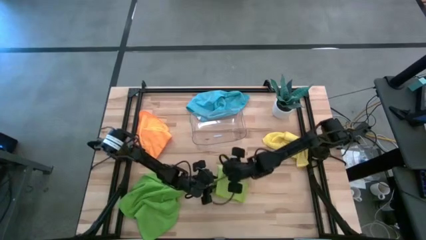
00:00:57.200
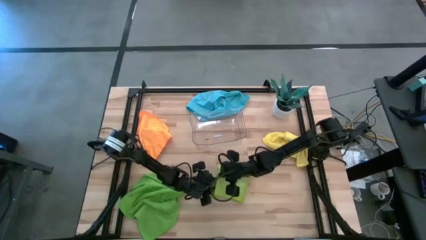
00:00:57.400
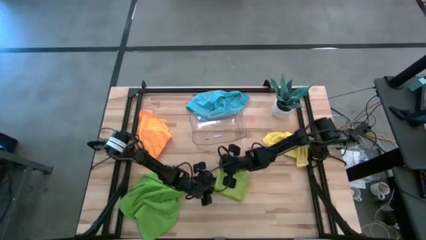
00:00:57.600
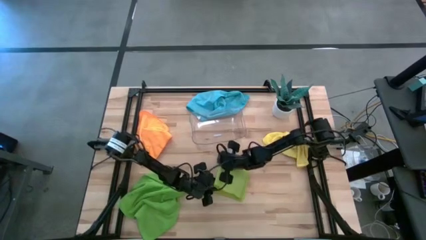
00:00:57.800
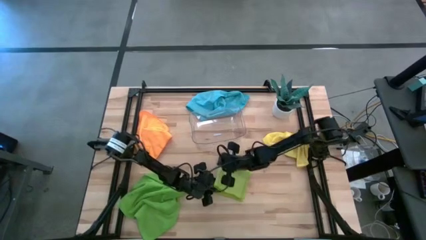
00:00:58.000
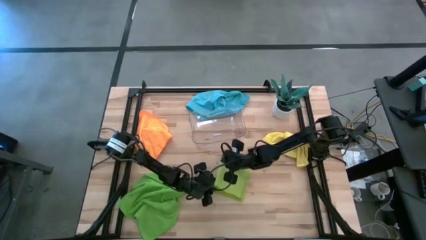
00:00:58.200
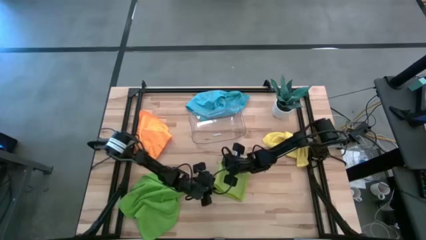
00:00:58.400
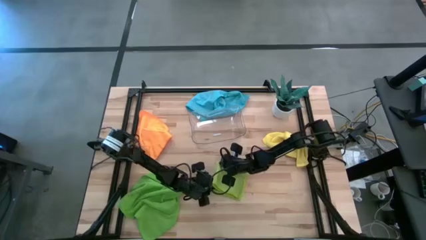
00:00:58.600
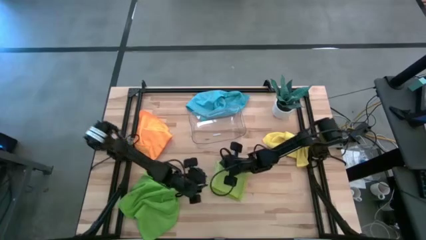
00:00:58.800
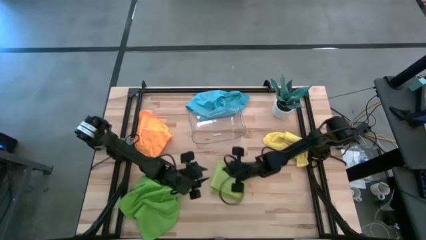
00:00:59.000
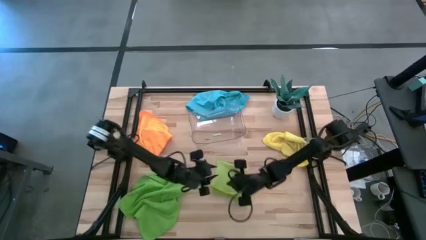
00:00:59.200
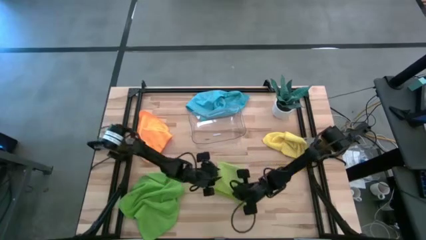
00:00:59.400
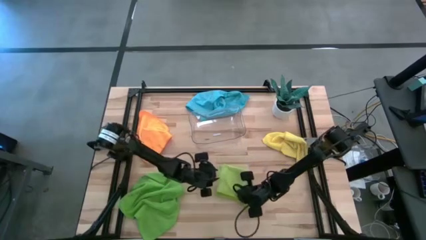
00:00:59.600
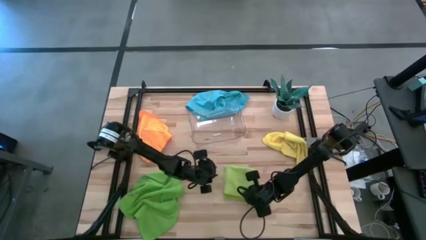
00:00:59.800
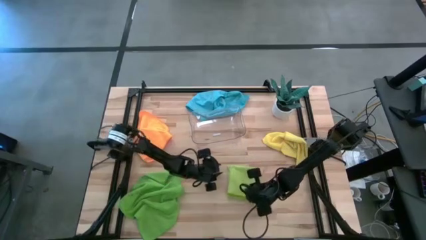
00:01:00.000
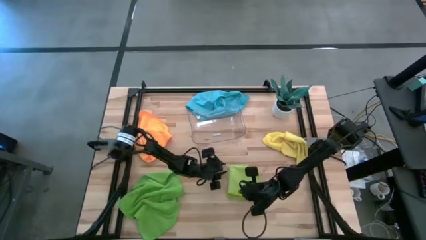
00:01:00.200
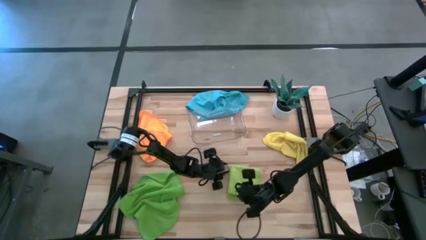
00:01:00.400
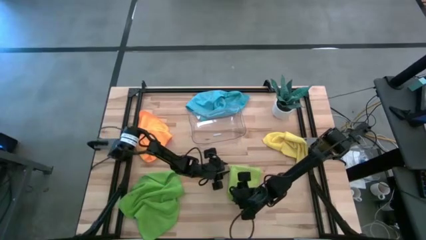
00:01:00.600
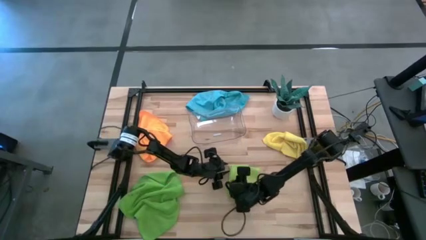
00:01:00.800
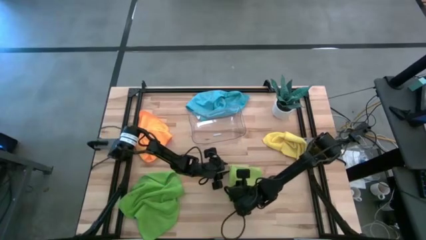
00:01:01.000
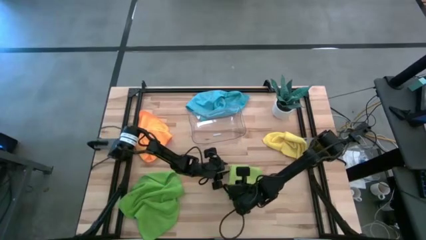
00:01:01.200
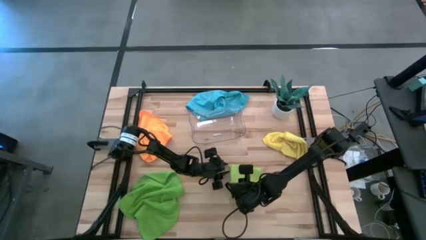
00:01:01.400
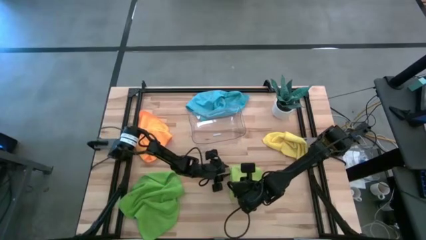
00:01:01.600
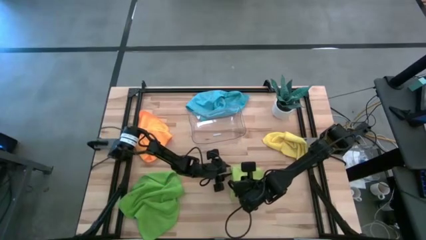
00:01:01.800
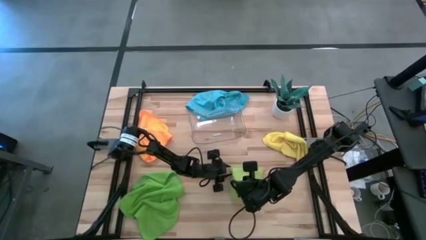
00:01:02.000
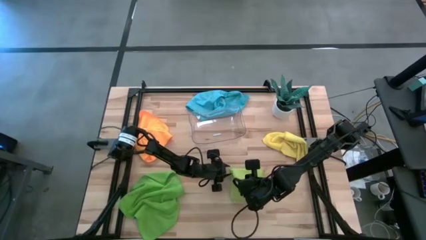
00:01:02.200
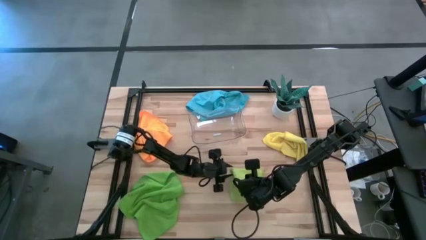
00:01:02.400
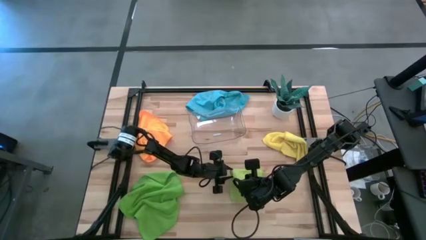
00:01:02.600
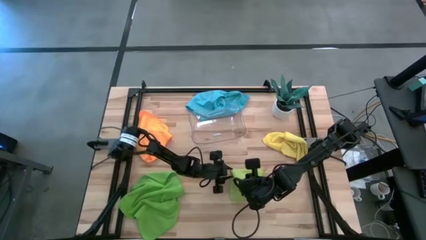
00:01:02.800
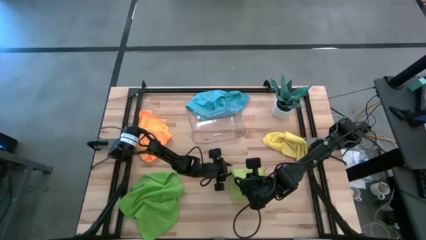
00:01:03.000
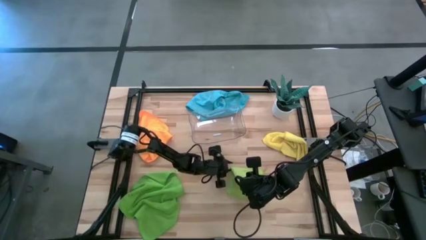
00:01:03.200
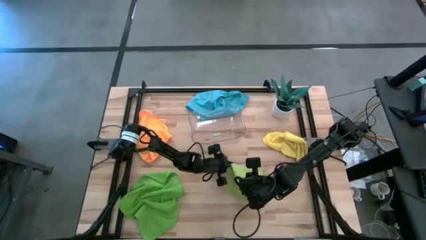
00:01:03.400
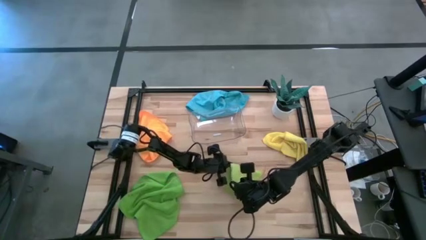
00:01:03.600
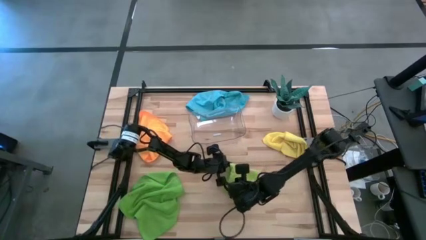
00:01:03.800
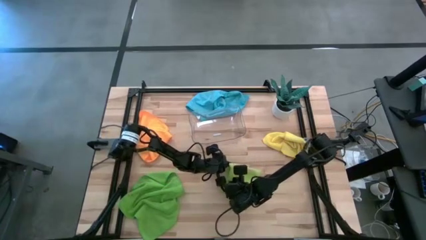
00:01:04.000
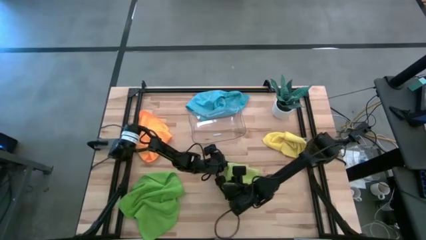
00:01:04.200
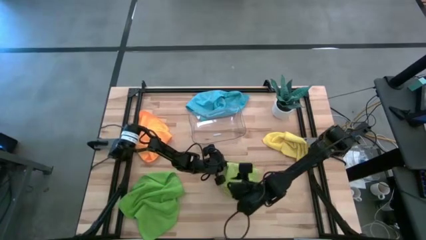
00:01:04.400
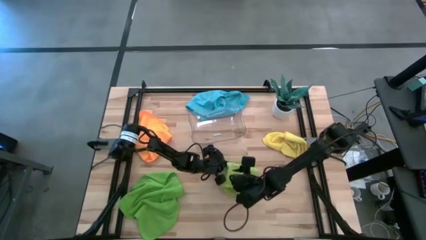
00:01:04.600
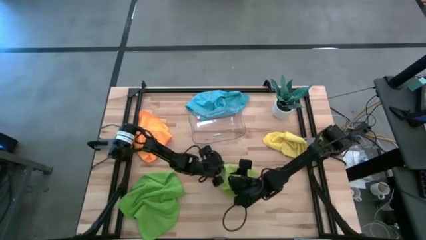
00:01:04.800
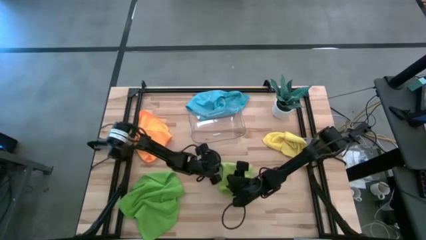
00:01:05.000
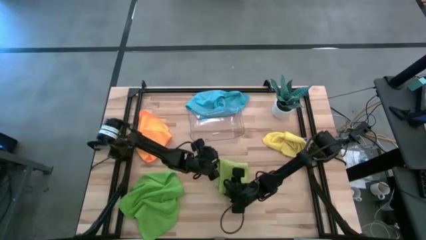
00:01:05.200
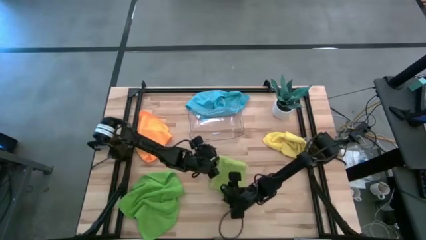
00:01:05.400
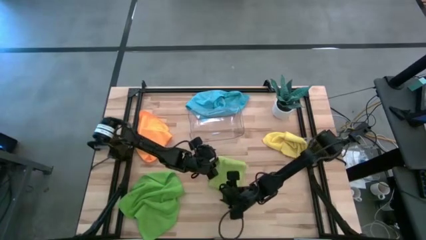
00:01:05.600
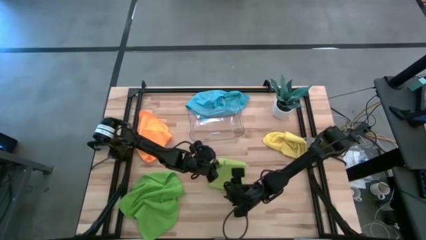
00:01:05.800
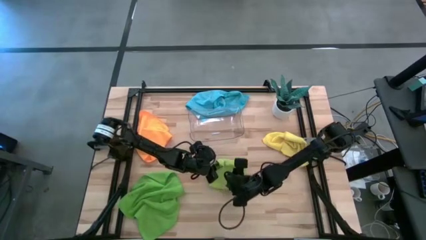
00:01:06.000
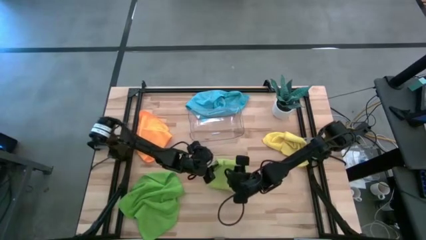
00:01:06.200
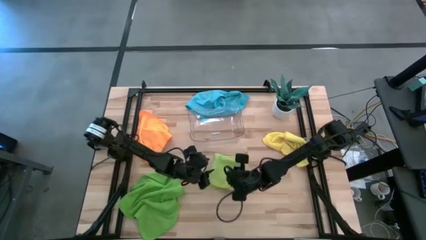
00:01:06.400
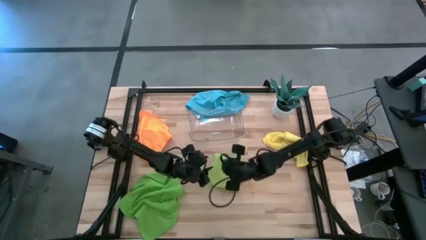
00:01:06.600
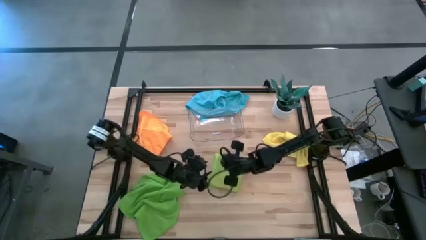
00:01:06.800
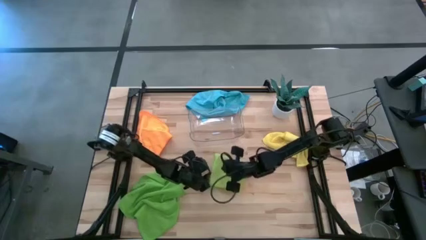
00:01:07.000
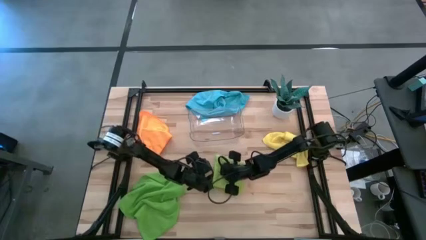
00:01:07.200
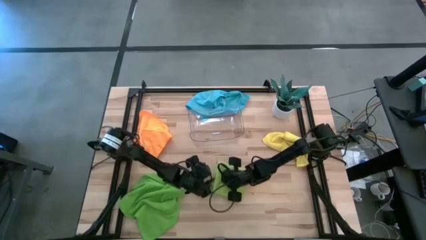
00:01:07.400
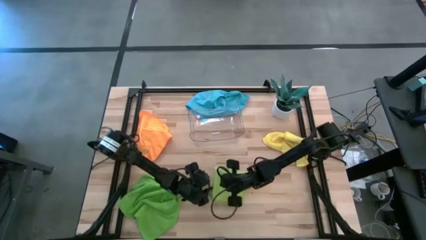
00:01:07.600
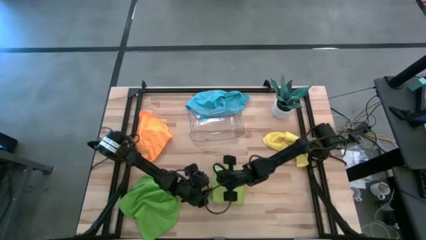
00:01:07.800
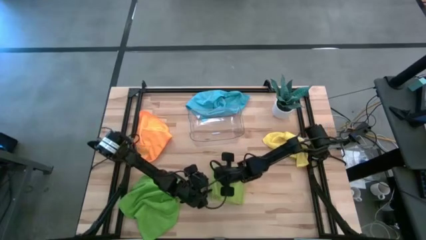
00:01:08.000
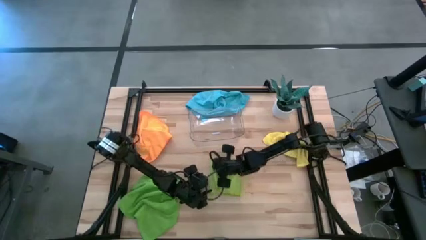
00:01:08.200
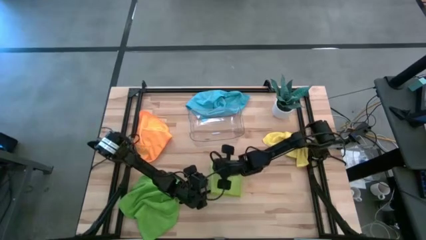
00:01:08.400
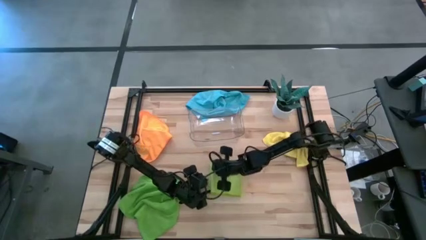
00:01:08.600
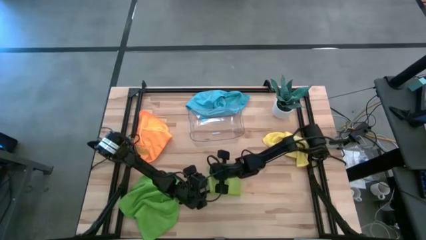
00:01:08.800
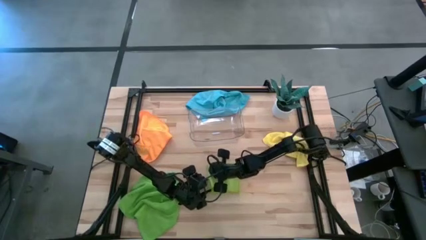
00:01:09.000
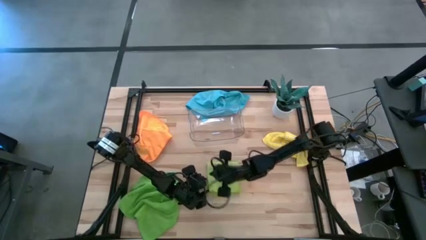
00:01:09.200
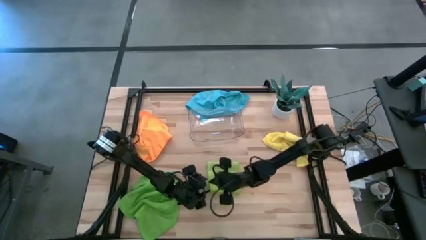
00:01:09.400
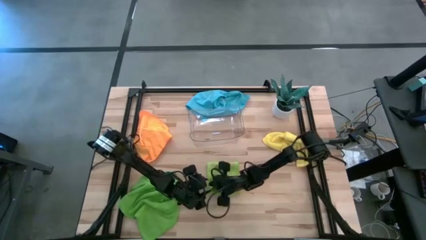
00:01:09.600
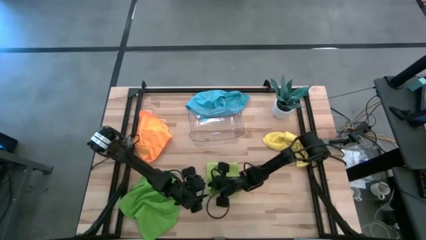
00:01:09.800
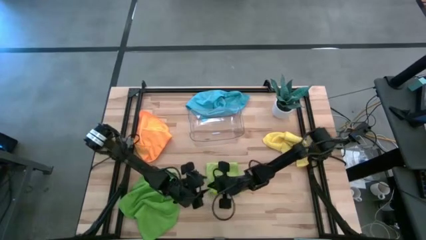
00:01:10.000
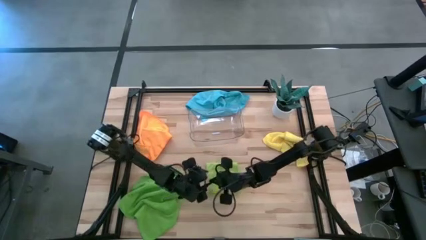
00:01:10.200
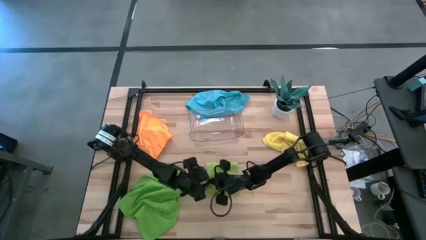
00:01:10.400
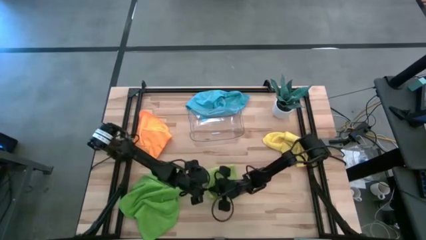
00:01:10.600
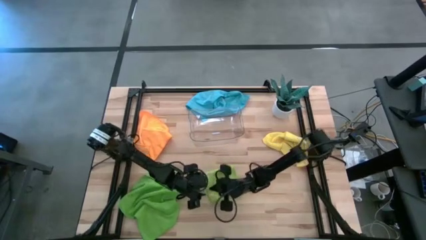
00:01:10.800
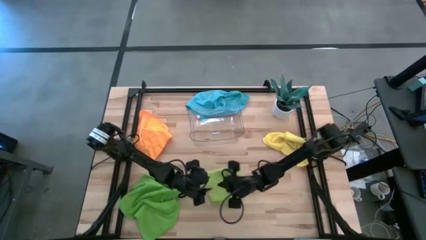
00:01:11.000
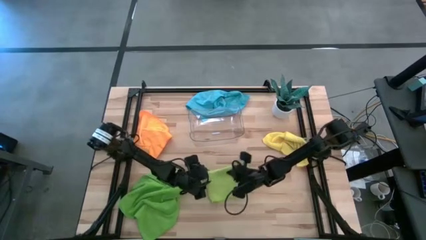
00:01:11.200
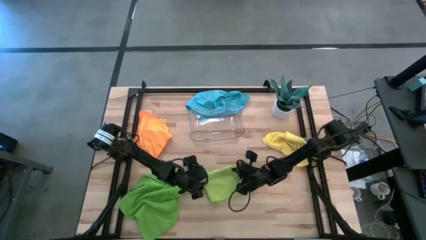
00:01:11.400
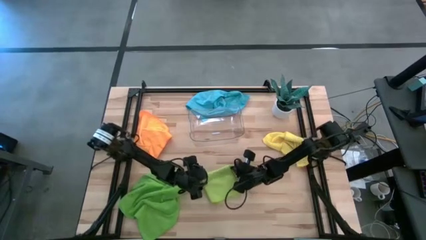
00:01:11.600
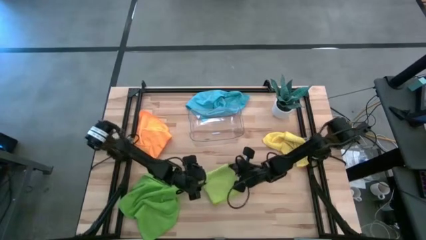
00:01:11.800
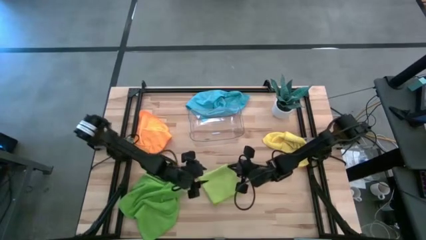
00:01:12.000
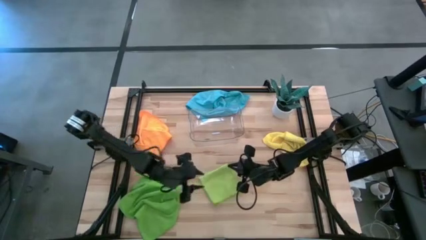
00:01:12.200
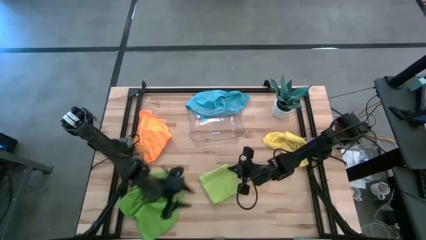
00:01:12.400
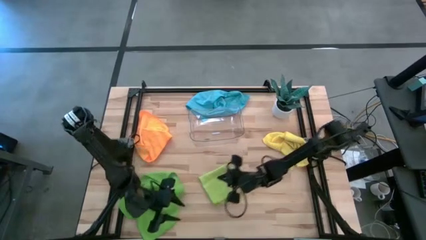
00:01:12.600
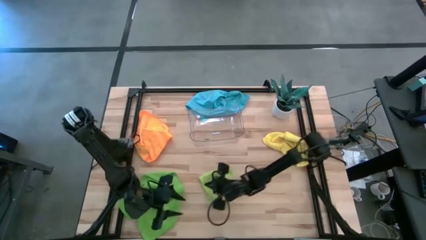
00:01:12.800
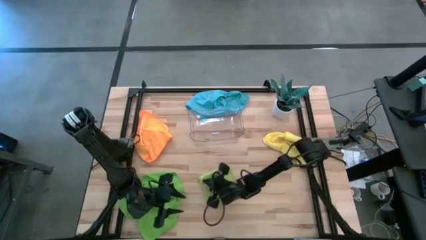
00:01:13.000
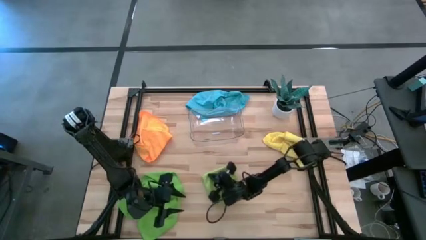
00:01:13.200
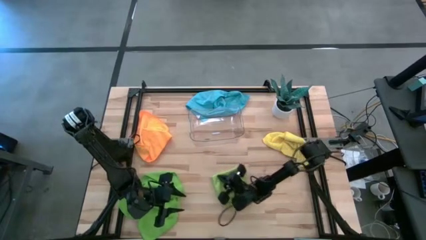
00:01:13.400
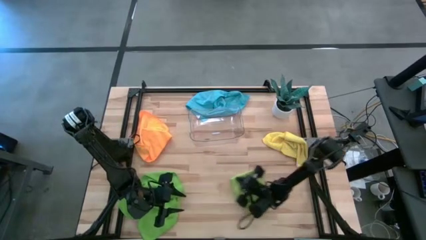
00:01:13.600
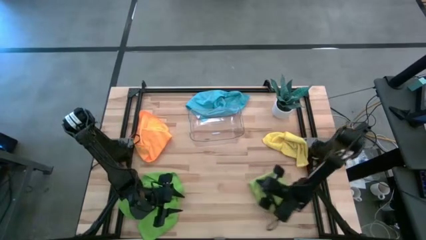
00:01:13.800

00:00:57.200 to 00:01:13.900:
Task: Fold microfiber towels
Fold the light green microfiber cloth
